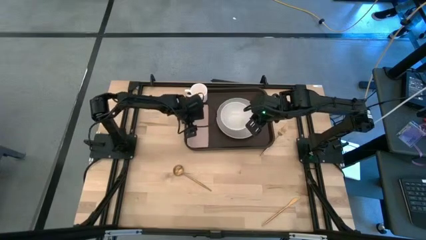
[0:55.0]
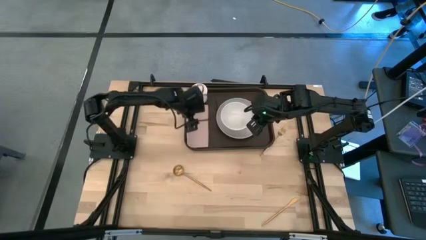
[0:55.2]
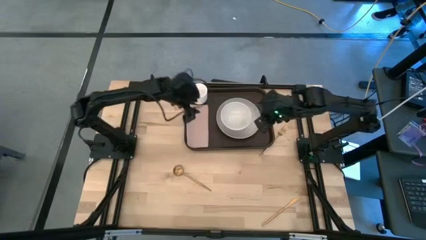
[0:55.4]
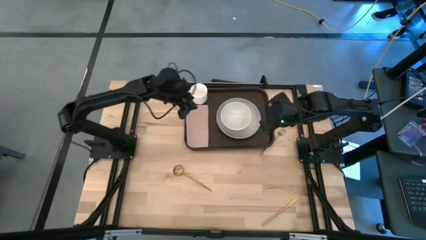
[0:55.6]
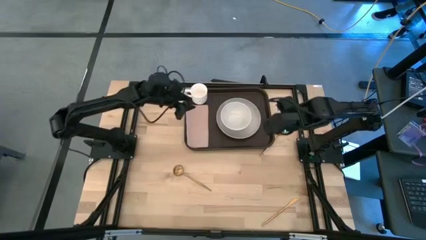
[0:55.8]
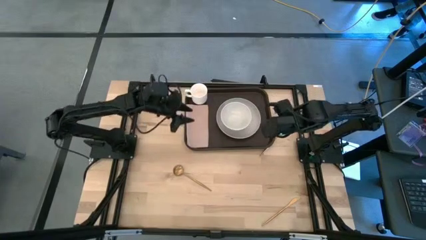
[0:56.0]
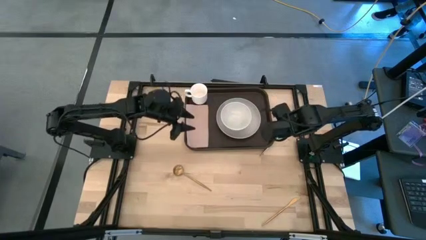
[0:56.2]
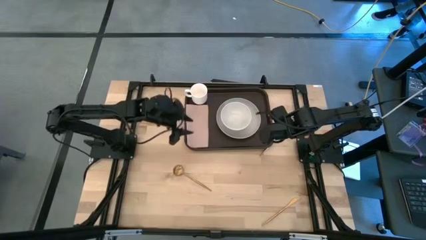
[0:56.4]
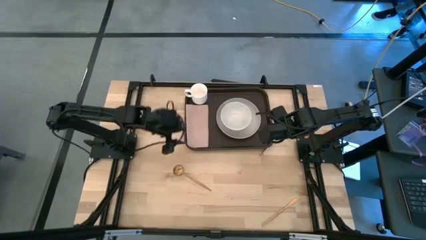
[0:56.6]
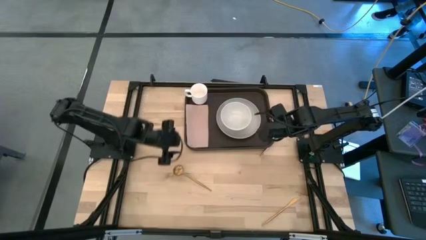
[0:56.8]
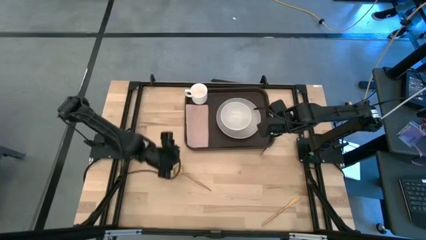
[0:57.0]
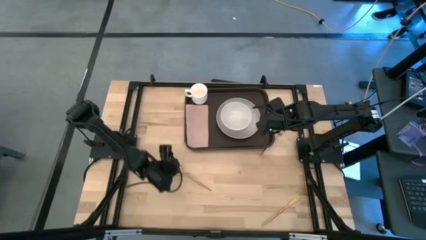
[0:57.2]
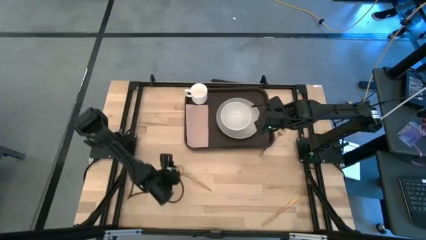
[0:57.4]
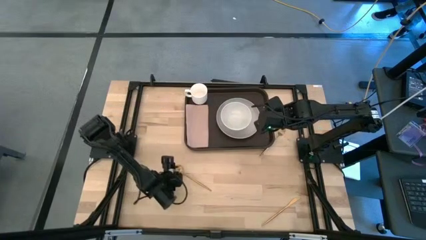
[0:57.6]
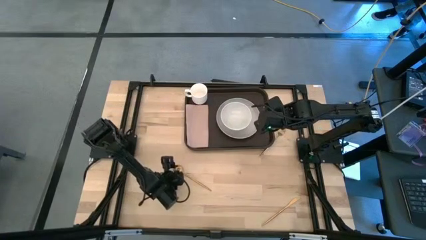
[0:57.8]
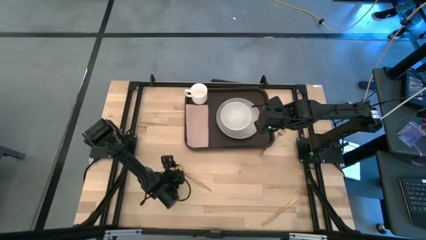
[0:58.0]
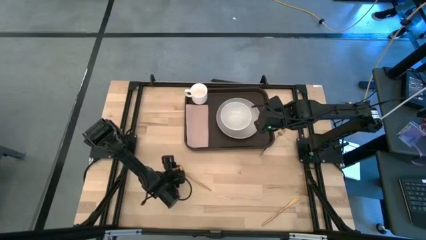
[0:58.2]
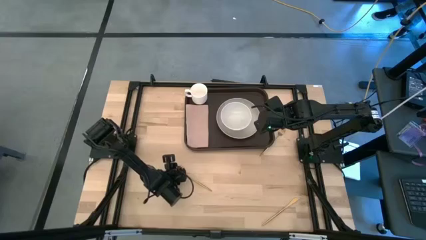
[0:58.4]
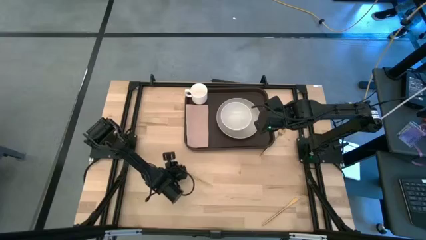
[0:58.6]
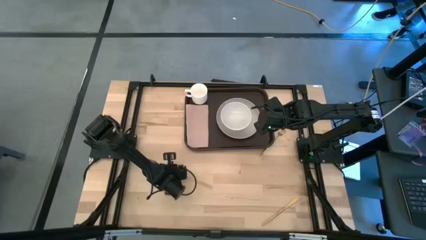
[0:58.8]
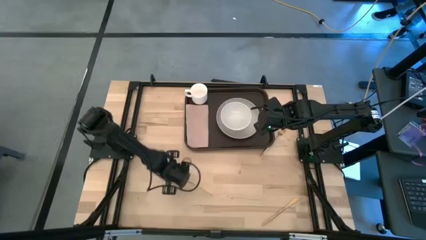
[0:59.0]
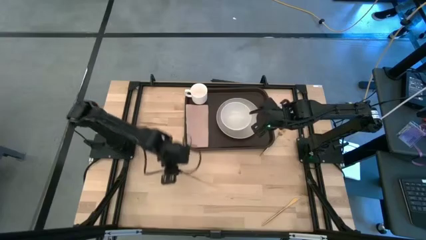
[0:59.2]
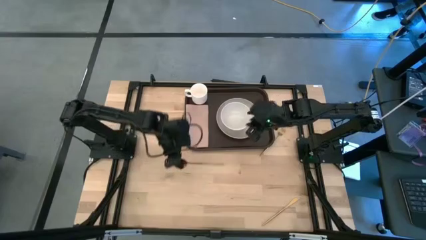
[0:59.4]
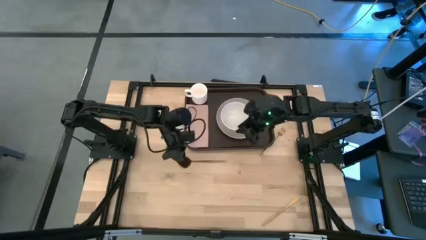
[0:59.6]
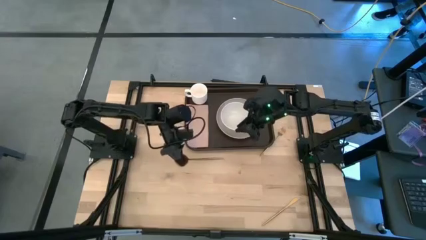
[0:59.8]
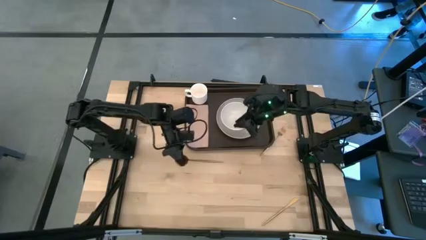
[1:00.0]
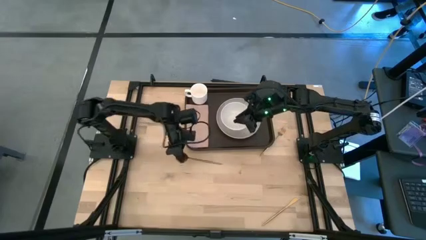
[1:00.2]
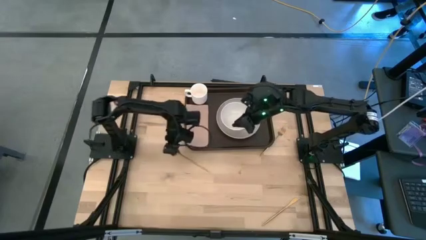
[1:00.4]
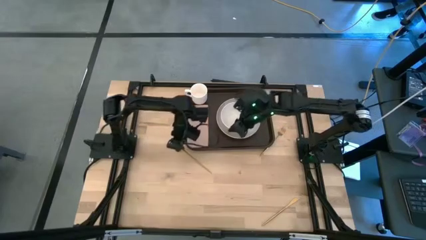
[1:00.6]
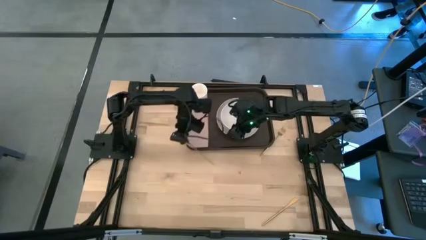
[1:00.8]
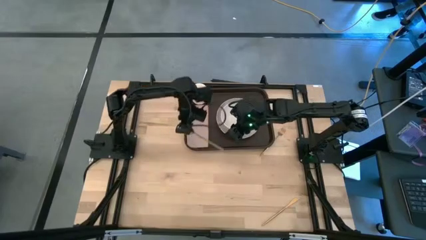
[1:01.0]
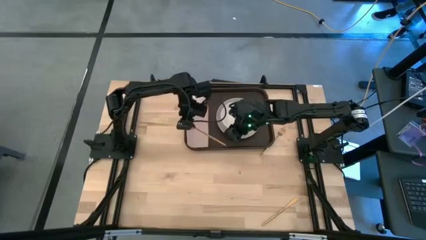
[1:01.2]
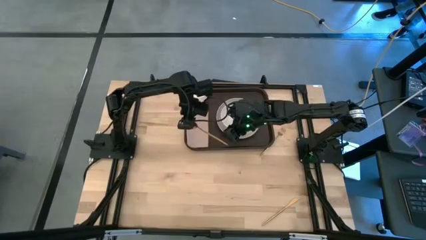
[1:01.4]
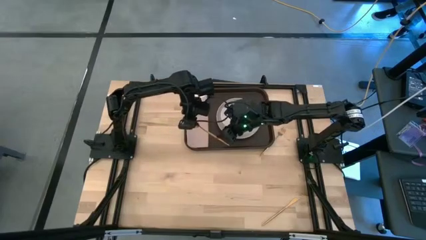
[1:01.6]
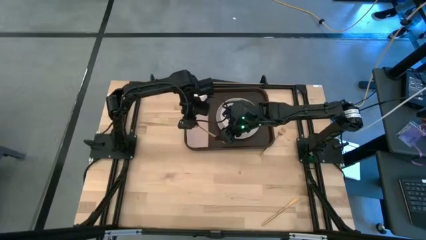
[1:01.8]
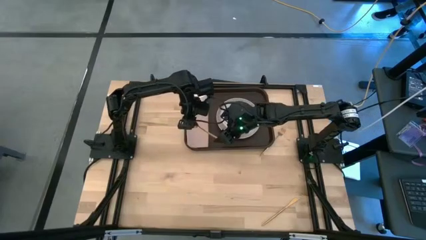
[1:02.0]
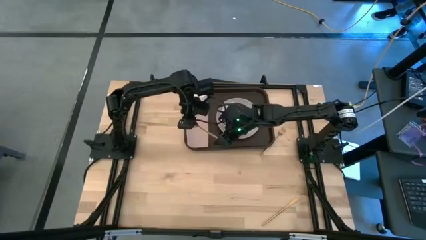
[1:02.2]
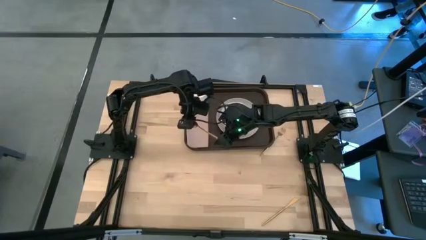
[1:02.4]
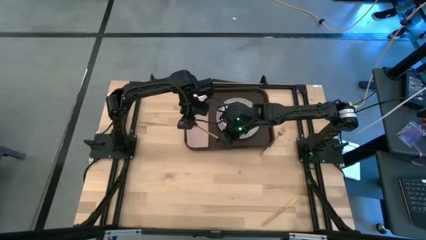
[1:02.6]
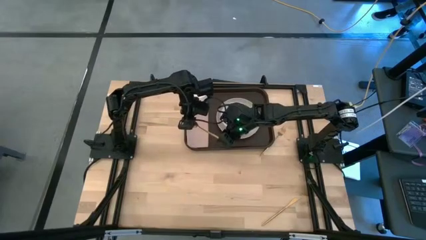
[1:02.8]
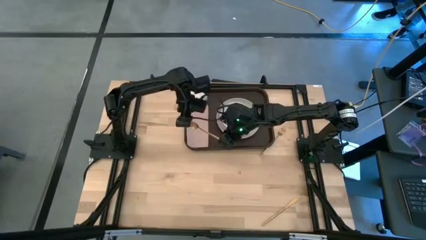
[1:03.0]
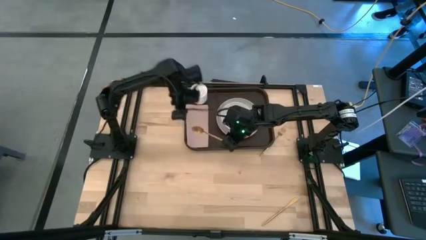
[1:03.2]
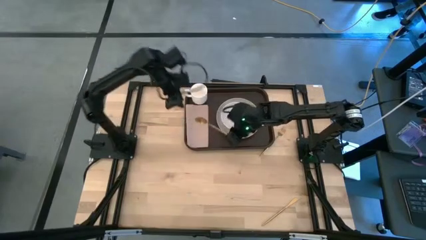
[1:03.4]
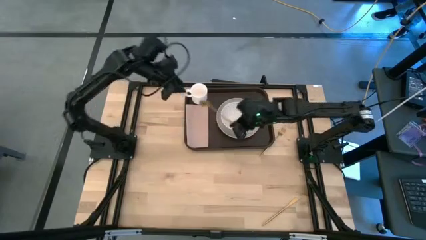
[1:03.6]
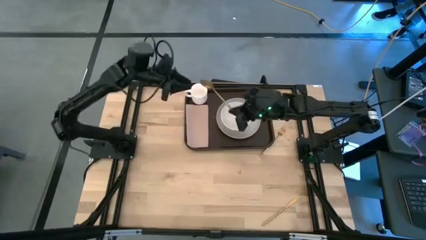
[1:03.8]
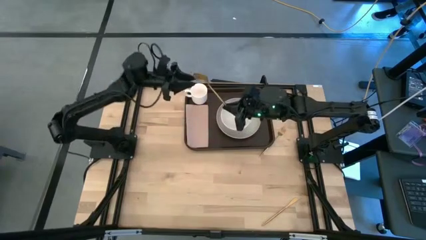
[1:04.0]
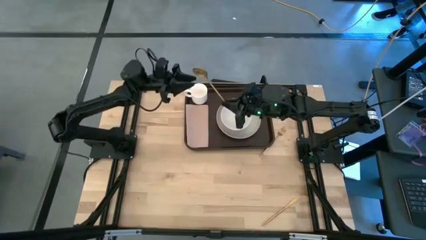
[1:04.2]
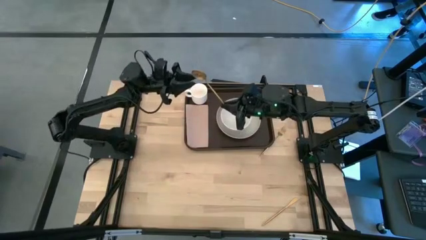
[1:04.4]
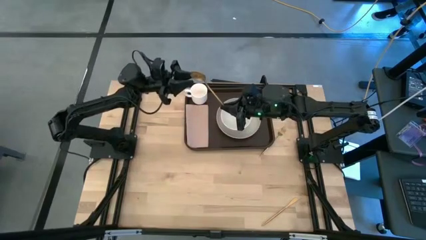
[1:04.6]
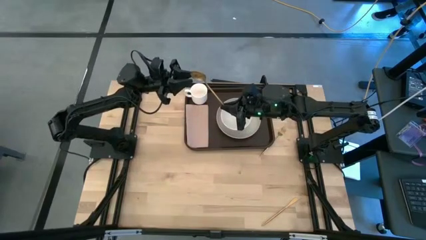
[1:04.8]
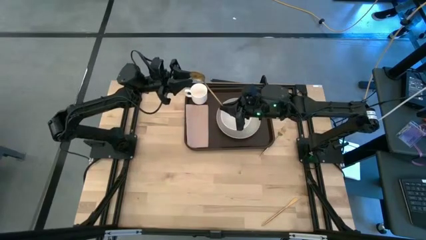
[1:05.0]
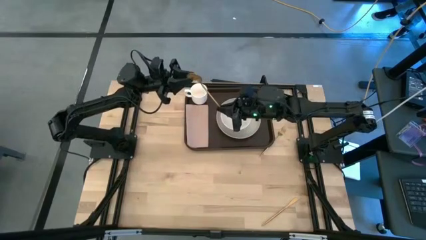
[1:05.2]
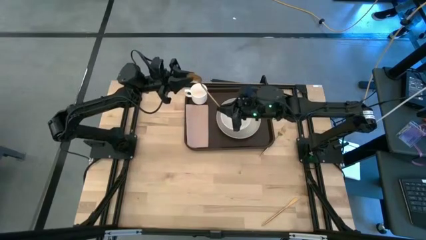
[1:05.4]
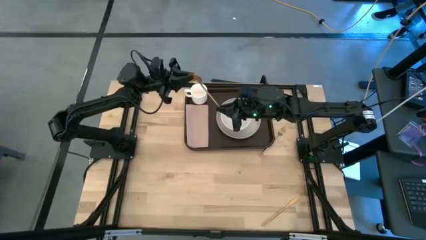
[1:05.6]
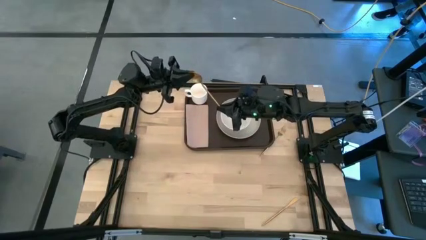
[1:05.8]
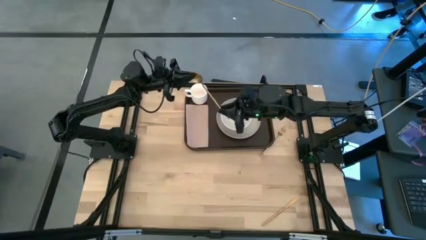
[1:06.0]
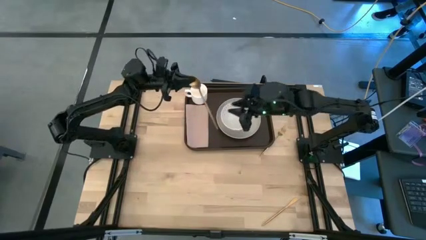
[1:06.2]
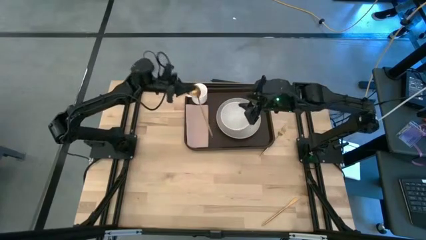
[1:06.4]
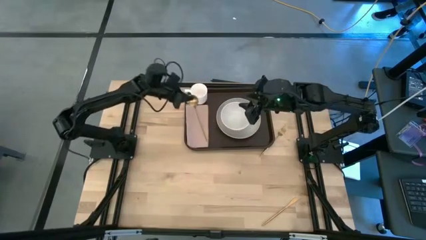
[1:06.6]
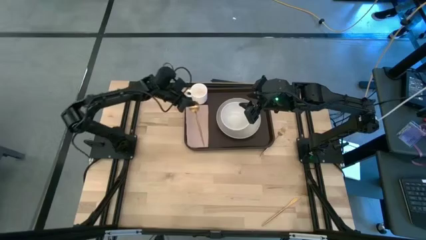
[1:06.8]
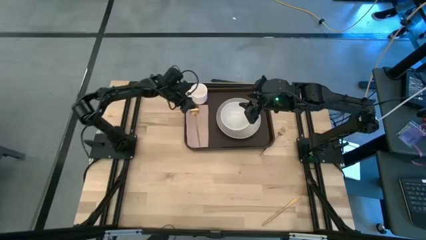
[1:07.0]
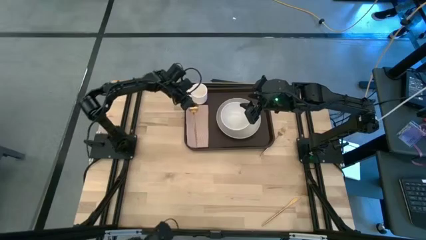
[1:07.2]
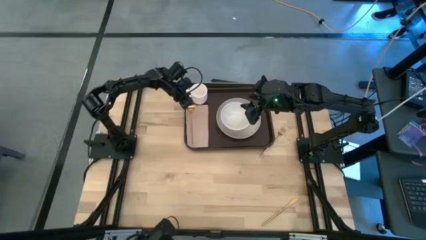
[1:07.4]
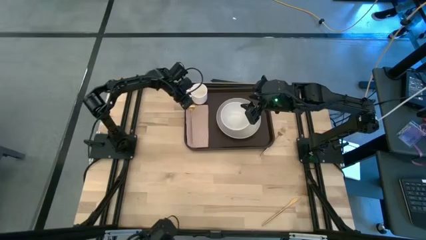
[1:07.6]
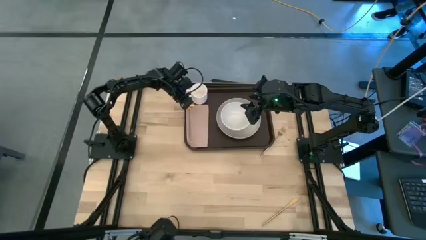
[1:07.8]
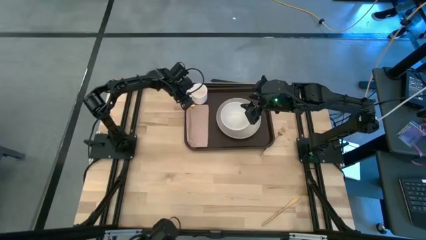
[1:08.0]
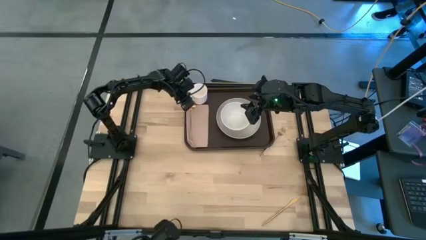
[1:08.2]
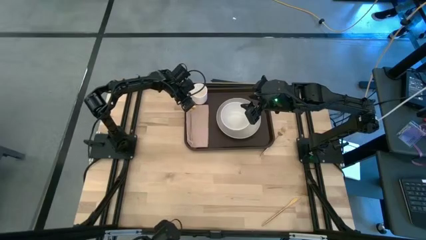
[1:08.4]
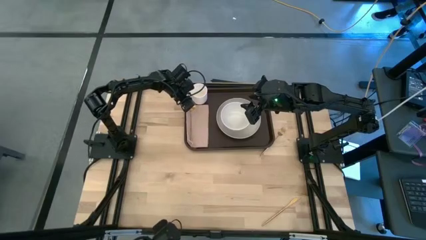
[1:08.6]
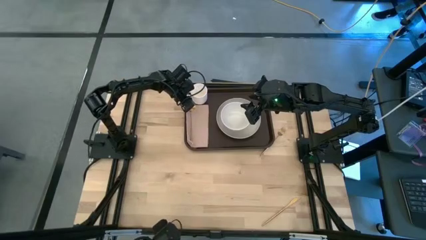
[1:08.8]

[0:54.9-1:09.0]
Task: Set up tray
Put the gold spoon on the light brown napkin
